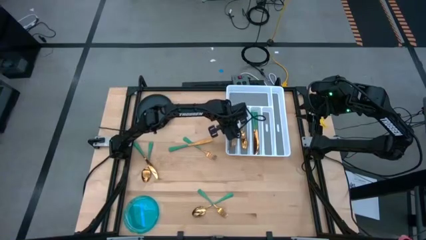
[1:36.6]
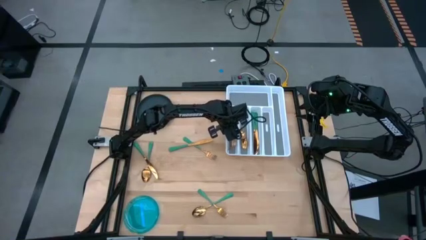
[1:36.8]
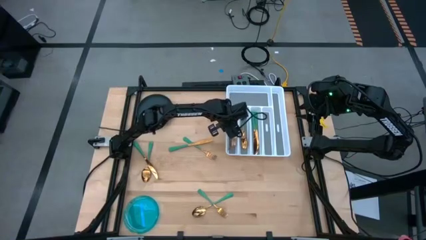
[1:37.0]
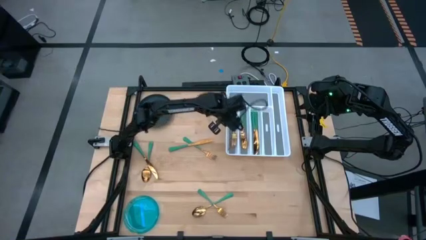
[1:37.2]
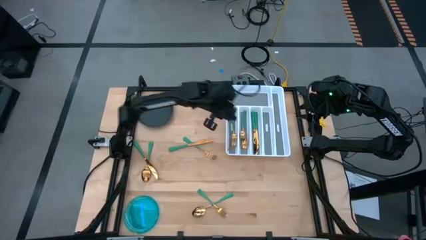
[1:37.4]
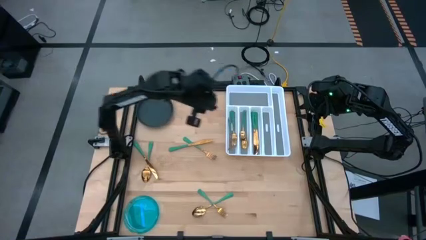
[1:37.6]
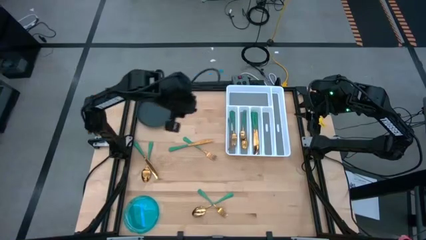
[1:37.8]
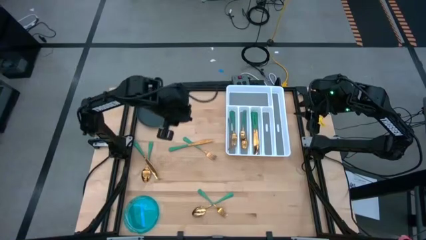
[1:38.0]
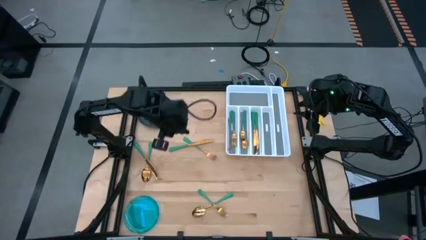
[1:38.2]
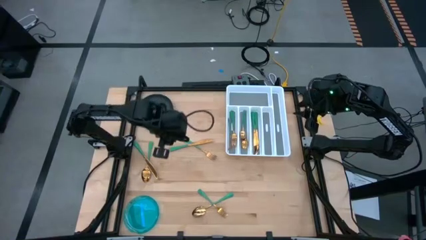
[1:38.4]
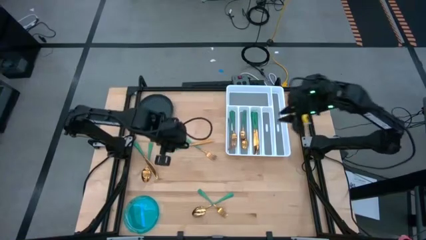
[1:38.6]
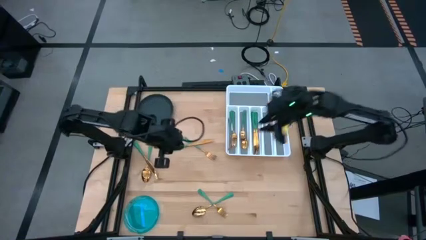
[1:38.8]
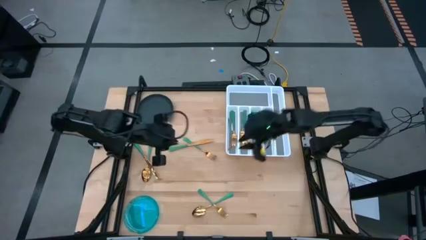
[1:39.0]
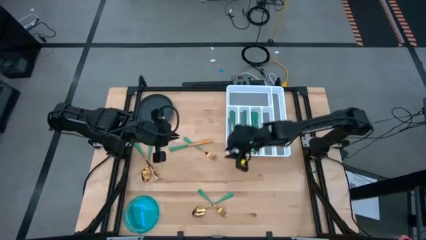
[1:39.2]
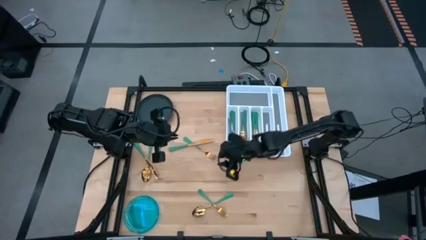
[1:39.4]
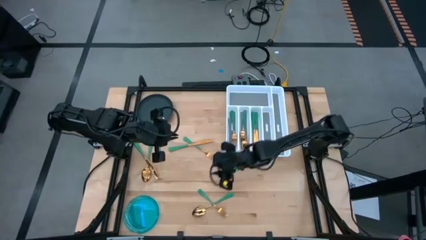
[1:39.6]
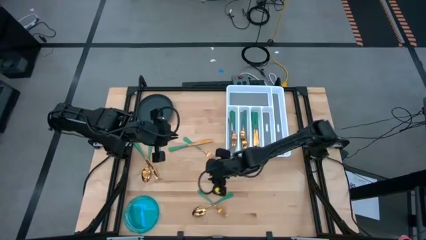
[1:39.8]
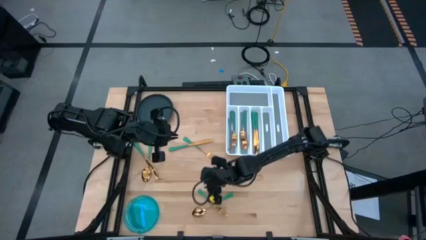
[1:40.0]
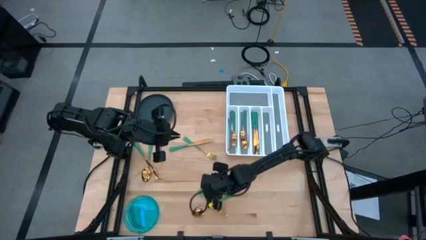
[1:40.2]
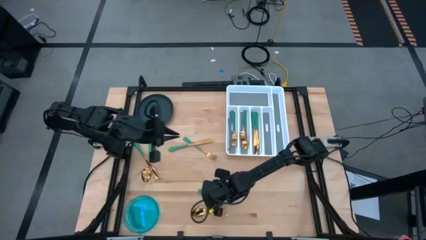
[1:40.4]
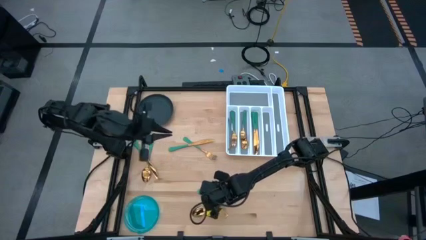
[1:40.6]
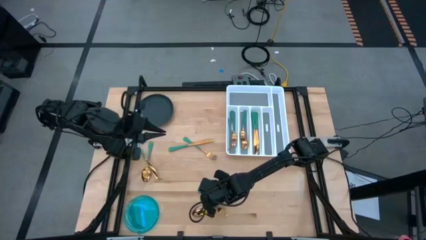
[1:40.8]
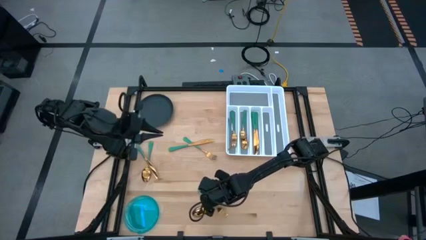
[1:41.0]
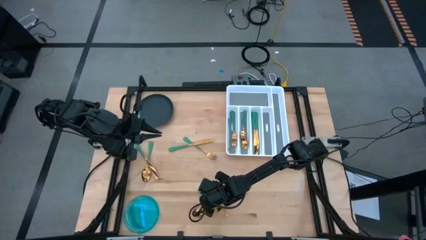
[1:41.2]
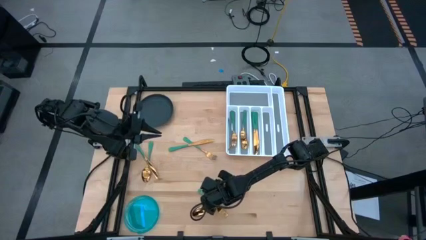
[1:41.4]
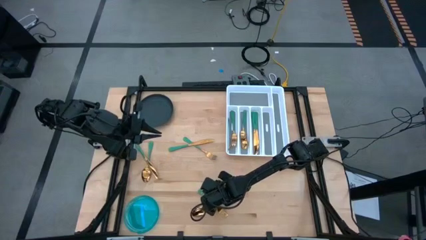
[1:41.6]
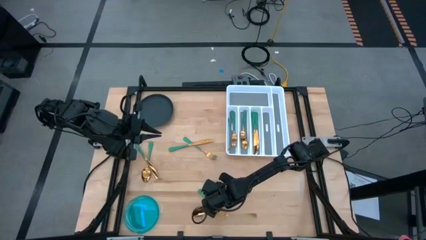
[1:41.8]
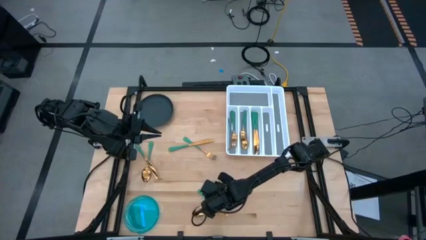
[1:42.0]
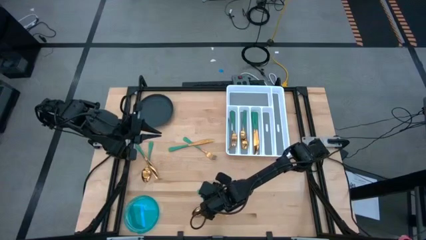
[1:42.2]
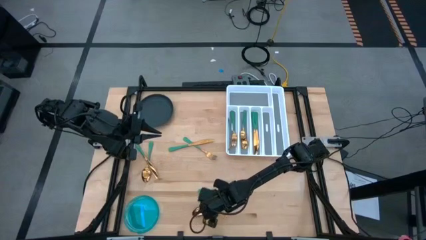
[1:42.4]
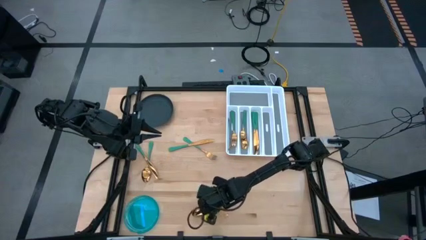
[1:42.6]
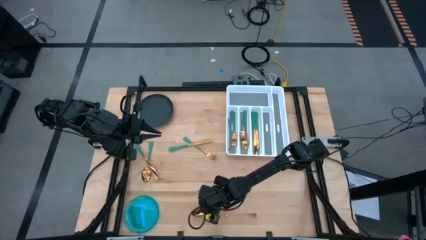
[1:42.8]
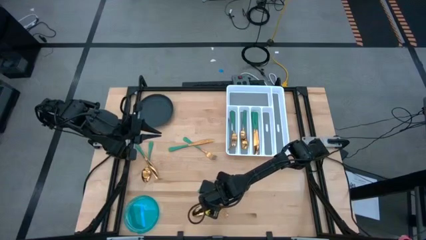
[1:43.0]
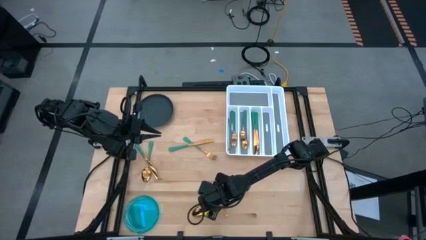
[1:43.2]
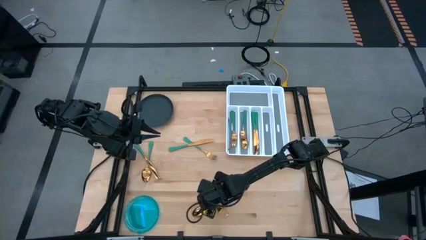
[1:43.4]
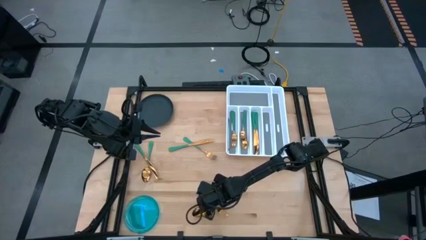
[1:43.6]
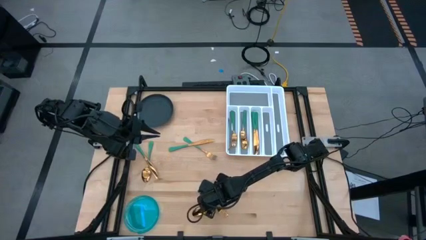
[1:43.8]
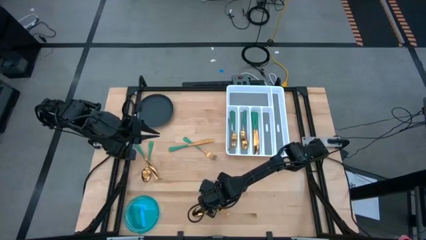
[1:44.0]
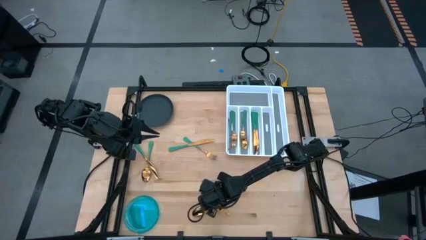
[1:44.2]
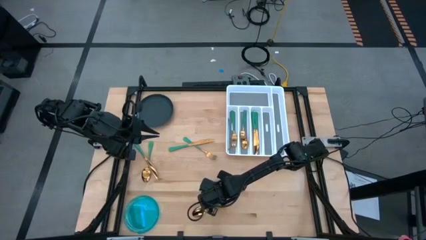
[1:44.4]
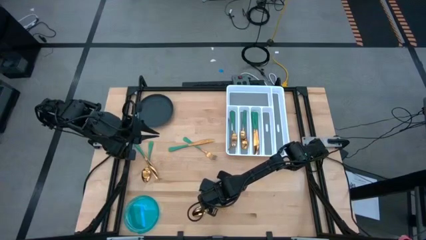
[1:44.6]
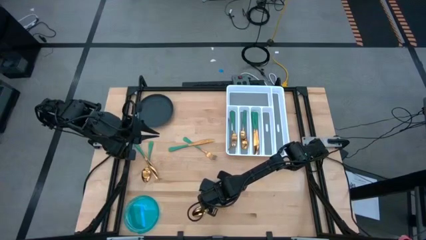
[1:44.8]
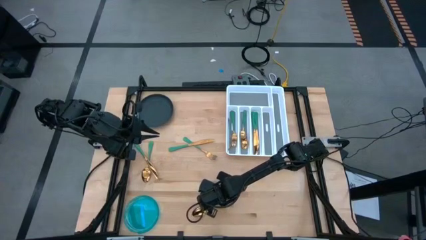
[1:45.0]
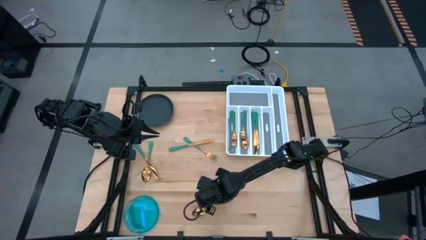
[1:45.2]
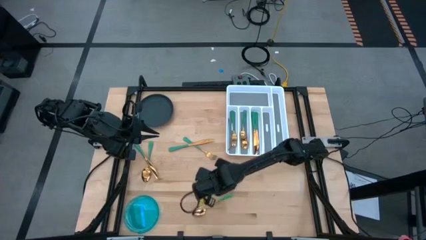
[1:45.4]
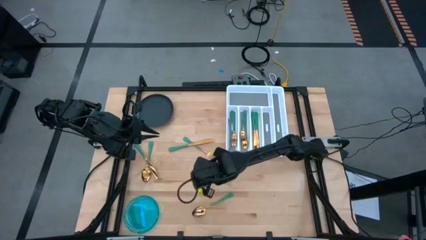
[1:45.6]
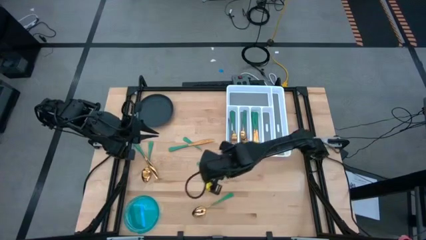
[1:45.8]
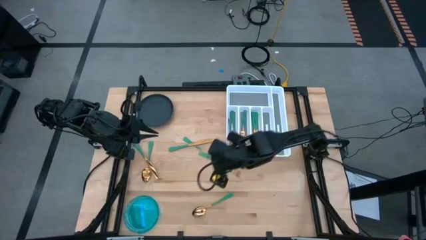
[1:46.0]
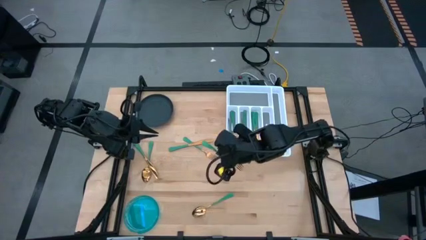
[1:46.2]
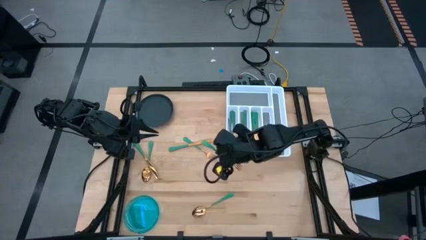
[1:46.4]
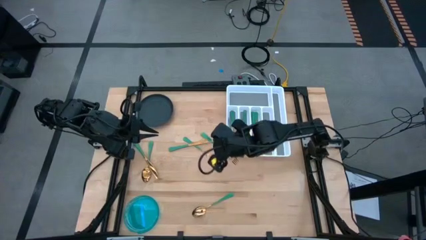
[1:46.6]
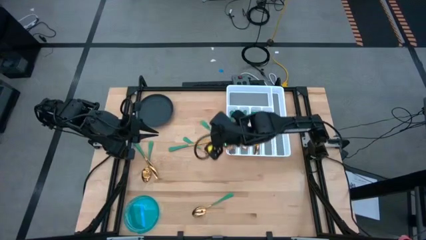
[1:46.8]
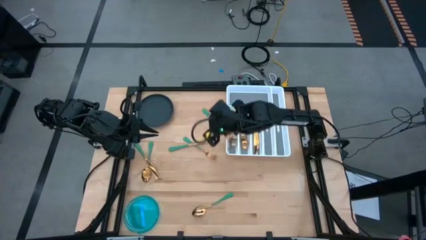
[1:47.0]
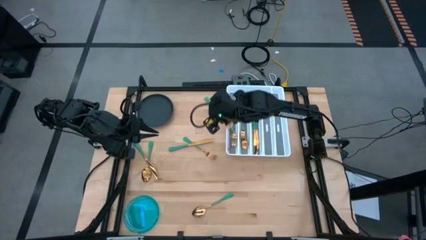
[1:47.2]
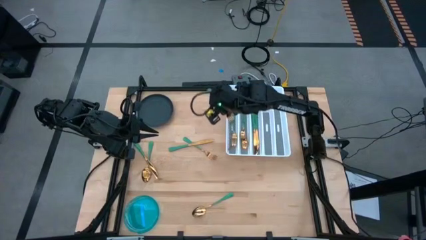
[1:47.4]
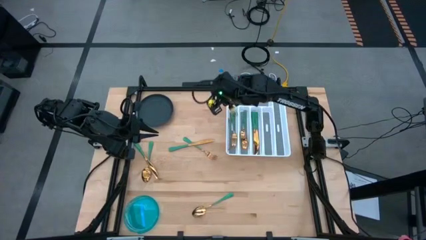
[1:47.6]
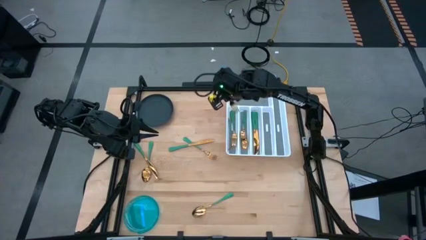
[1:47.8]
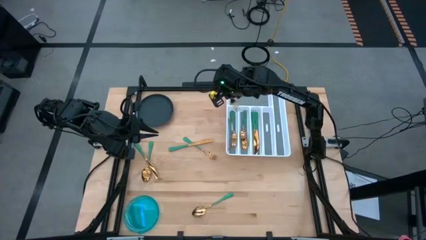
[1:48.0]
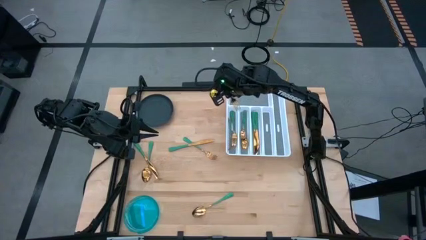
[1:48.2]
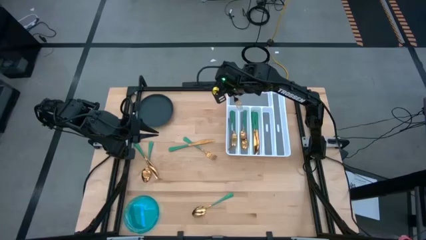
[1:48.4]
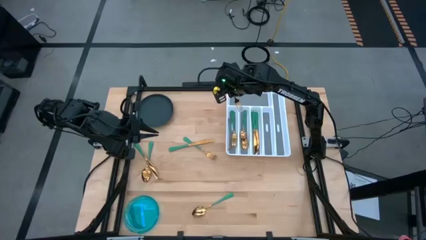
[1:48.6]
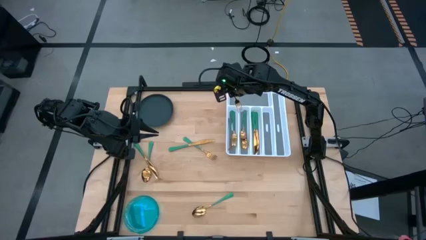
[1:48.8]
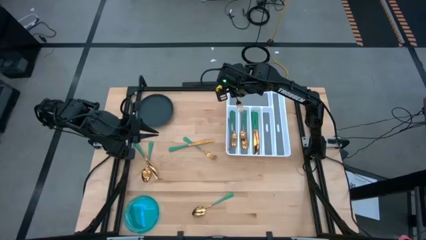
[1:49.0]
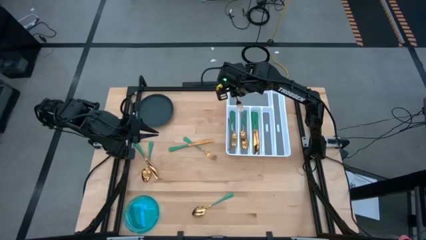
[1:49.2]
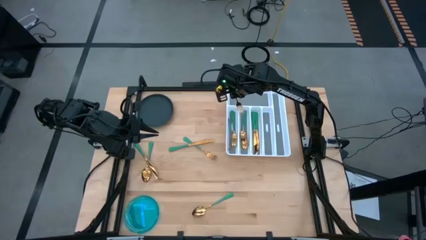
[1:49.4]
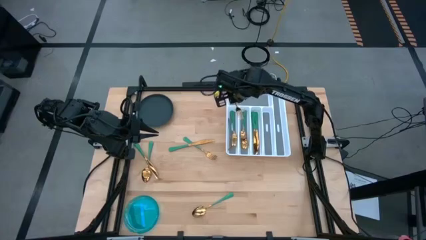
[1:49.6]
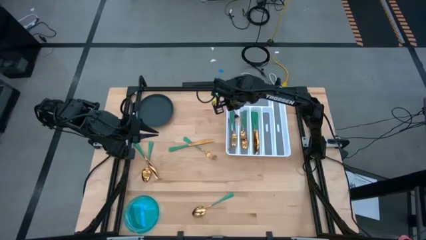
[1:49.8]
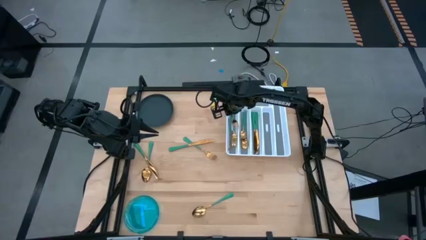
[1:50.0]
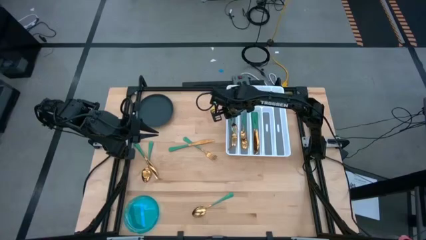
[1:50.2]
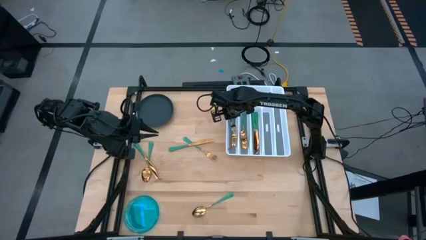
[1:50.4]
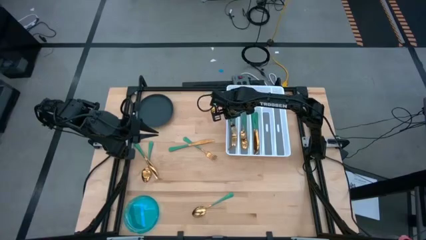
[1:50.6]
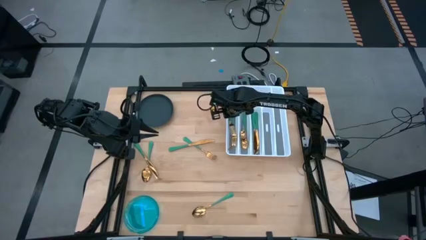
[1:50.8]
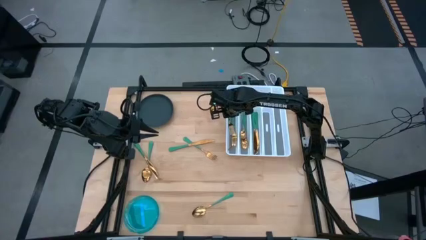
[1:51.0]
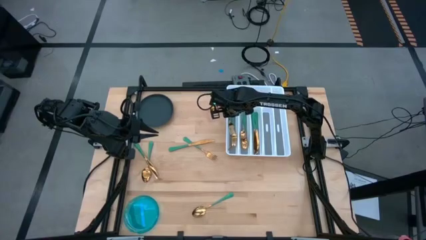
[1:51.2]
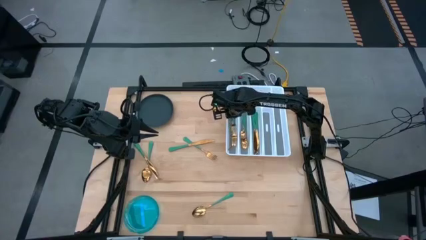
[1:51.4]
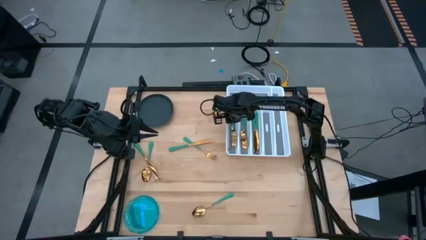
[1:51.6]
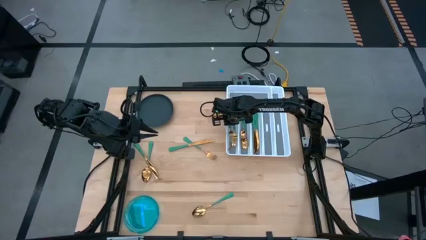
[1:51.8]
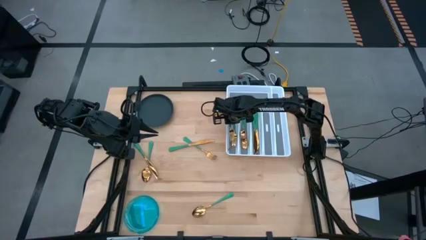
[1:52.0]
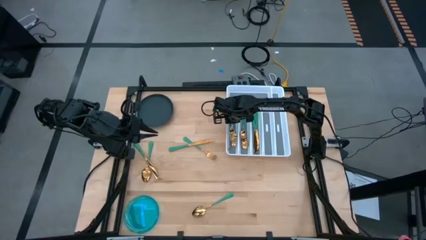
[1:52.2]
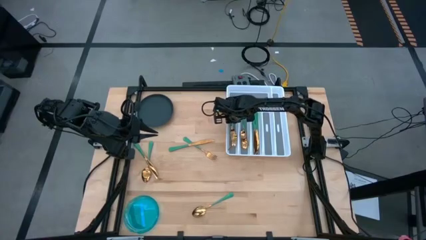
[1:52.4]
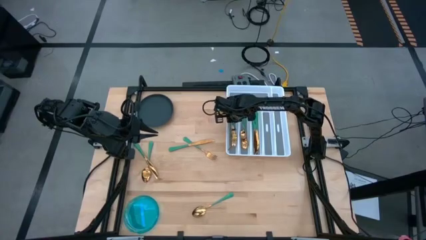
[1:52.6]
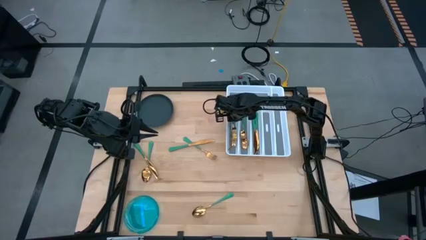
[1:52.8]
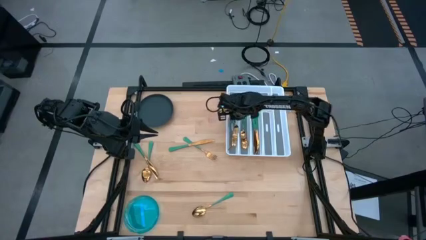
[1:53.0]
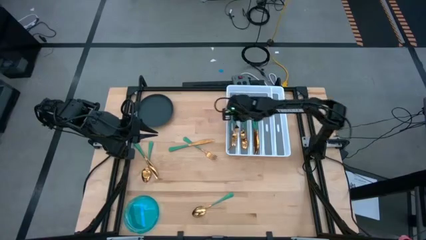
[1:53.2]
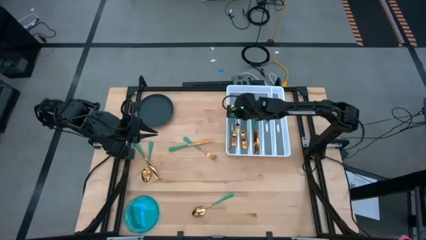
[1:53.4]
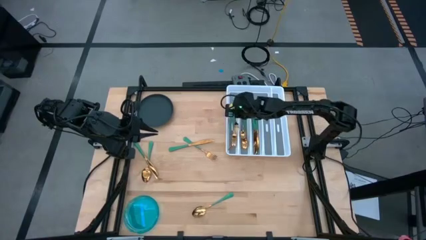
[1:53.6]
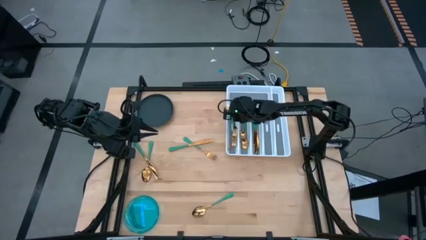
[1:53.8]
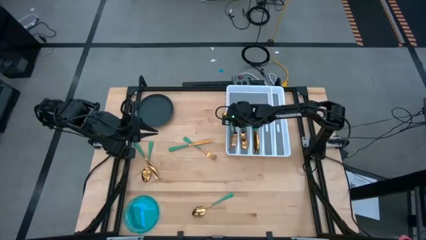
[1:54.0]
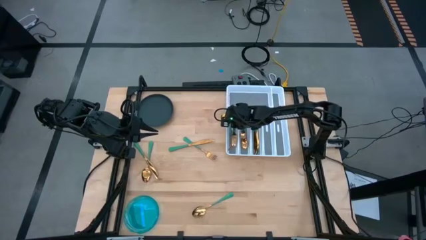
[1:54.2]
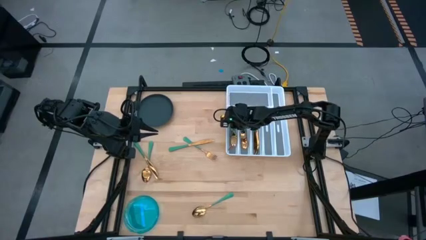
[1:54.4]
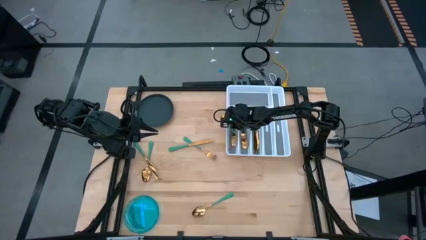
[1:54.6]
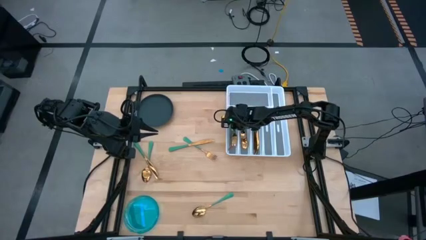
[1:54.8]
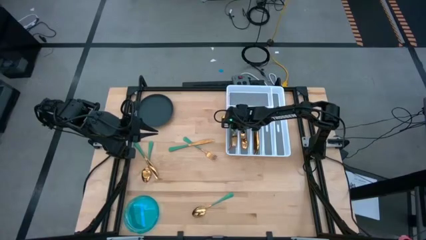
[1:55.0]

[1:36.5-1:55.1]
Task: Sort silverware
Put the green fork into the white silverware organizer
